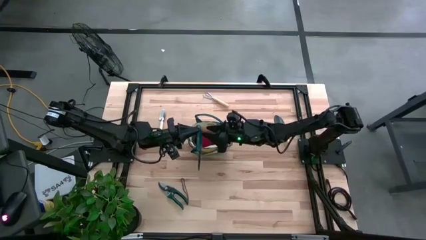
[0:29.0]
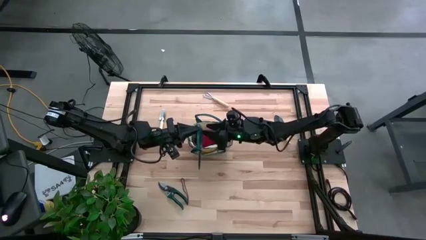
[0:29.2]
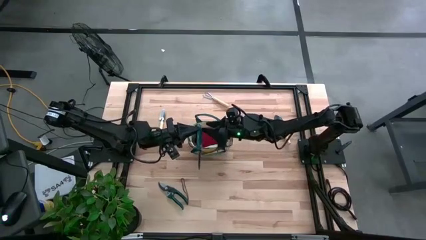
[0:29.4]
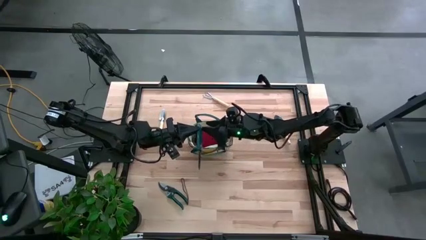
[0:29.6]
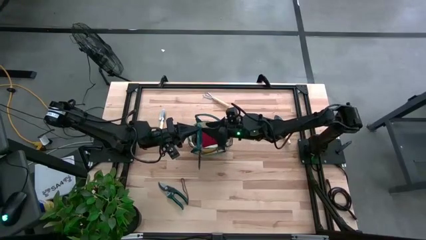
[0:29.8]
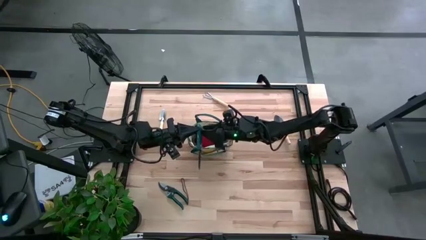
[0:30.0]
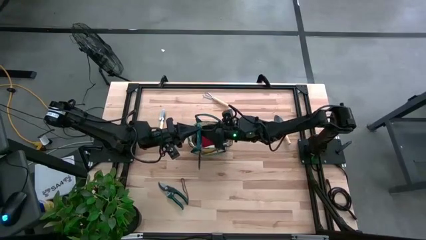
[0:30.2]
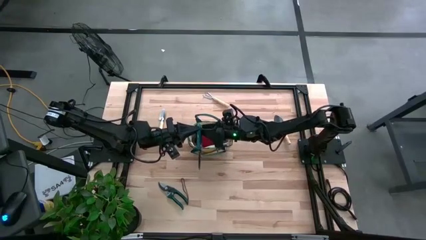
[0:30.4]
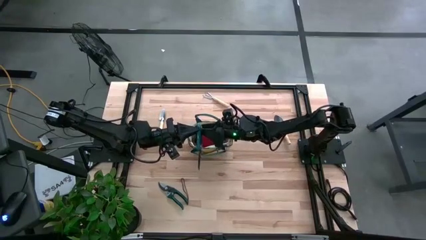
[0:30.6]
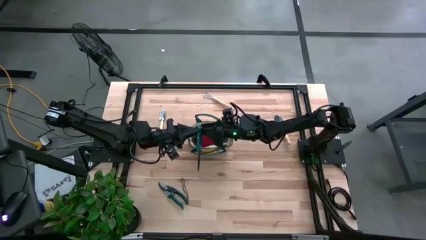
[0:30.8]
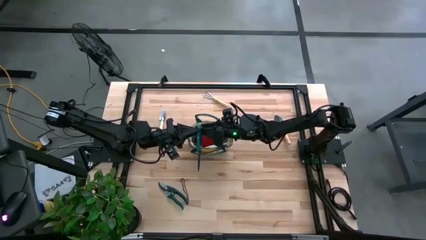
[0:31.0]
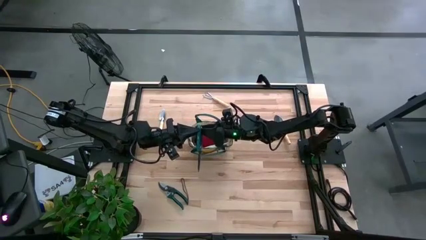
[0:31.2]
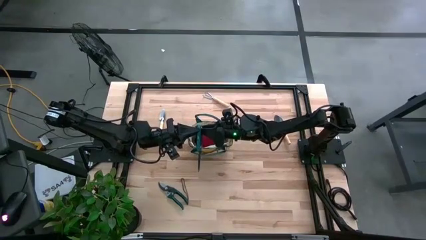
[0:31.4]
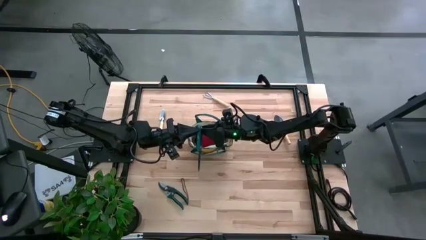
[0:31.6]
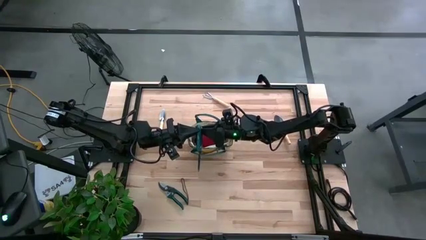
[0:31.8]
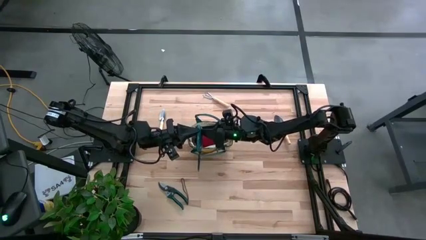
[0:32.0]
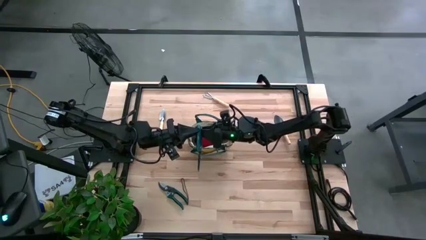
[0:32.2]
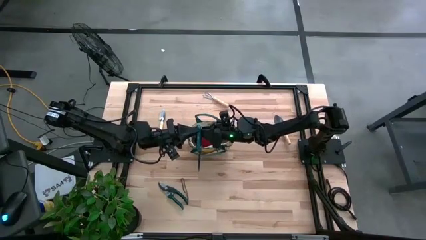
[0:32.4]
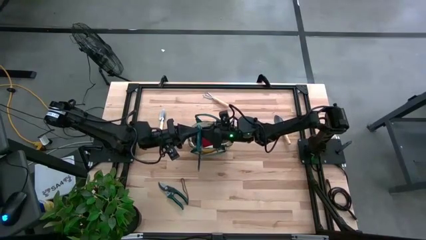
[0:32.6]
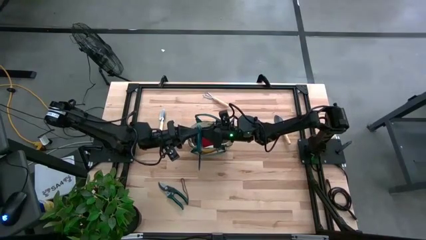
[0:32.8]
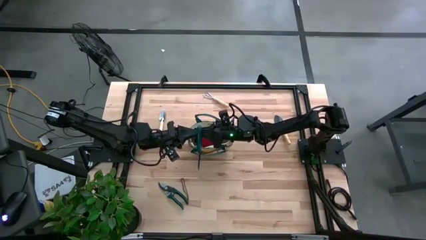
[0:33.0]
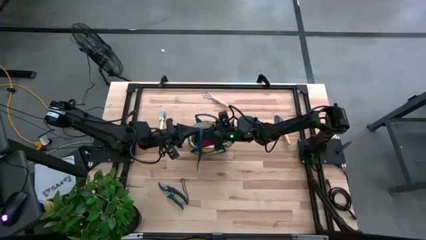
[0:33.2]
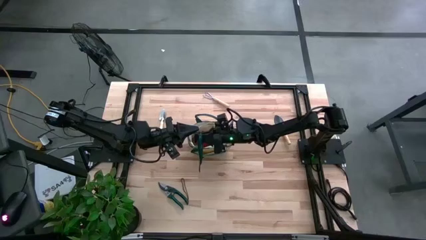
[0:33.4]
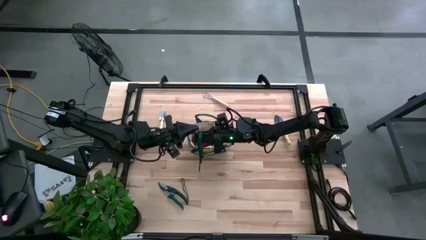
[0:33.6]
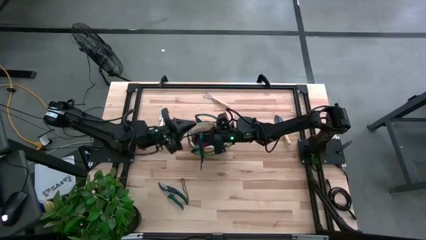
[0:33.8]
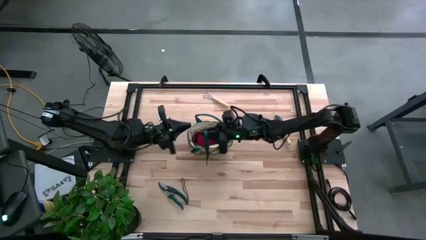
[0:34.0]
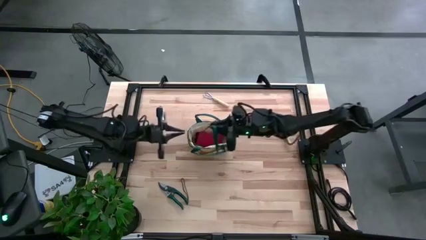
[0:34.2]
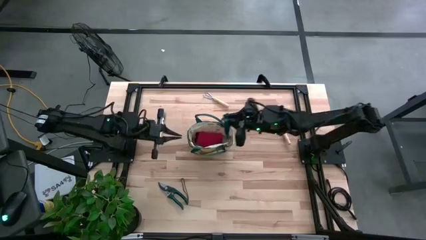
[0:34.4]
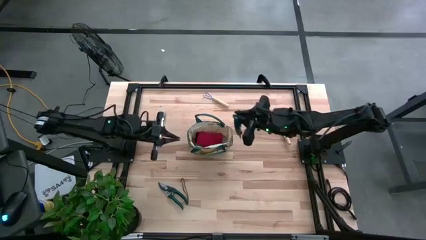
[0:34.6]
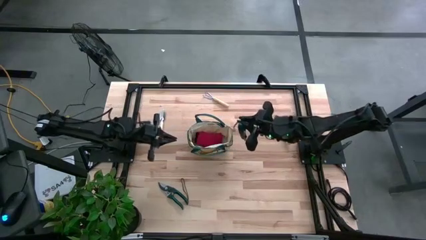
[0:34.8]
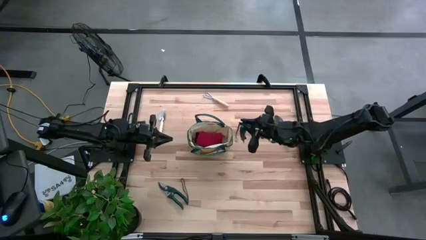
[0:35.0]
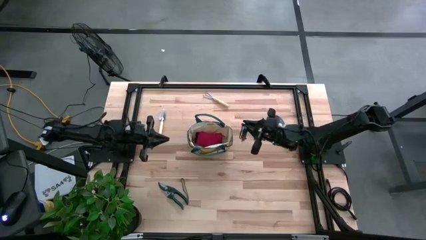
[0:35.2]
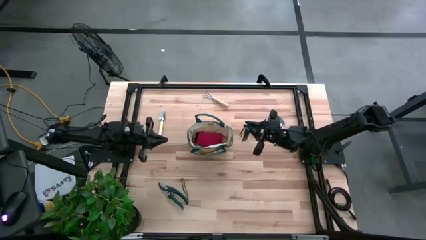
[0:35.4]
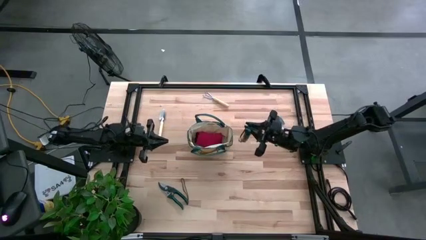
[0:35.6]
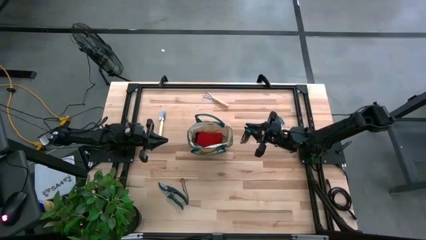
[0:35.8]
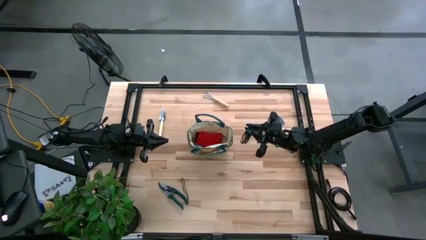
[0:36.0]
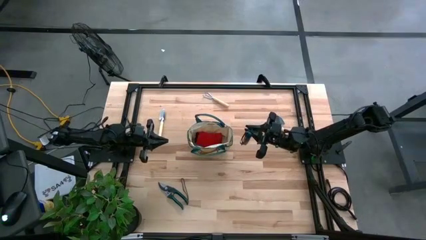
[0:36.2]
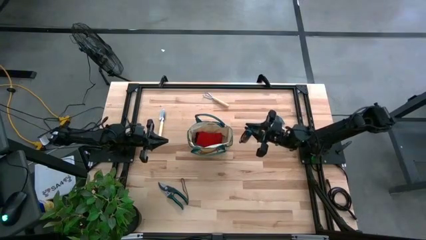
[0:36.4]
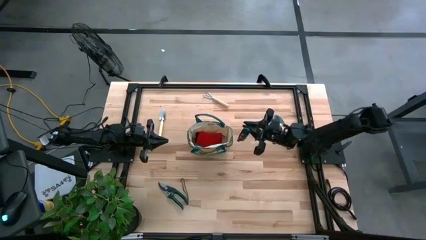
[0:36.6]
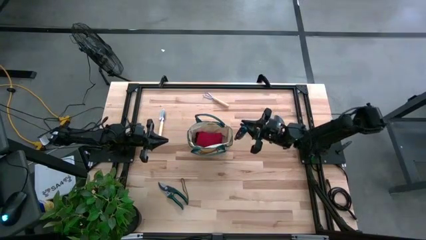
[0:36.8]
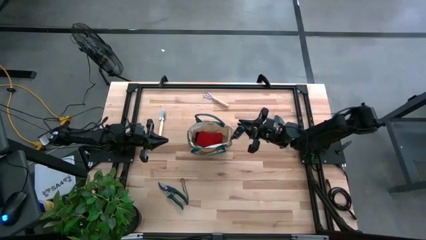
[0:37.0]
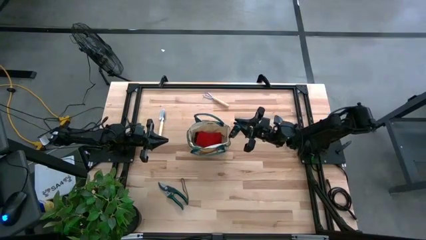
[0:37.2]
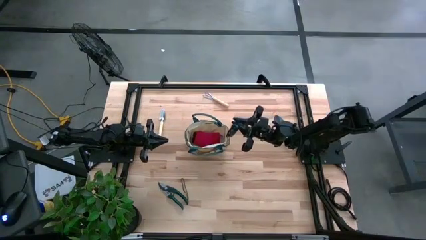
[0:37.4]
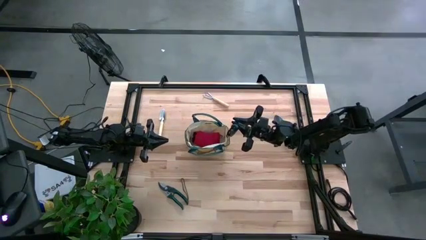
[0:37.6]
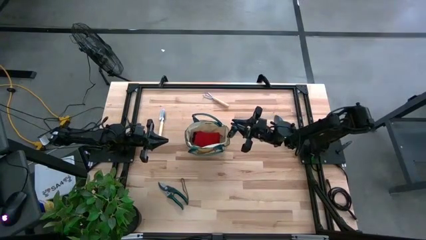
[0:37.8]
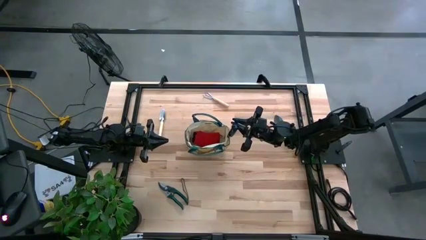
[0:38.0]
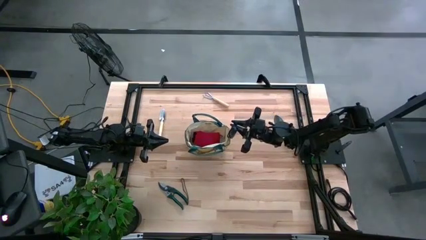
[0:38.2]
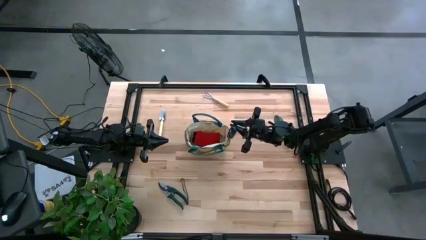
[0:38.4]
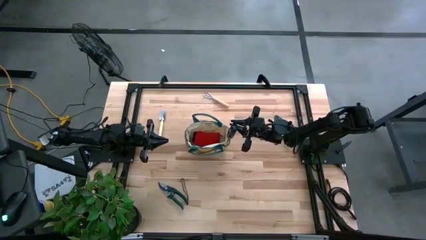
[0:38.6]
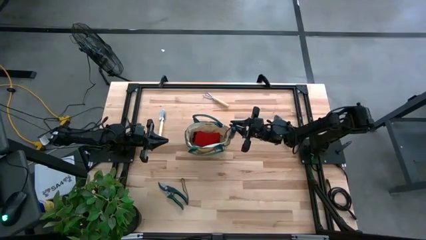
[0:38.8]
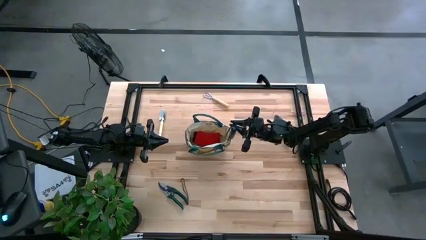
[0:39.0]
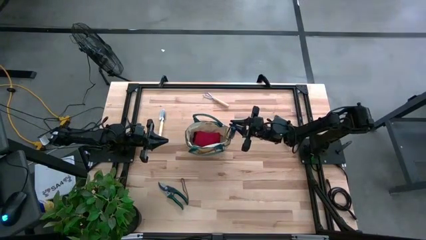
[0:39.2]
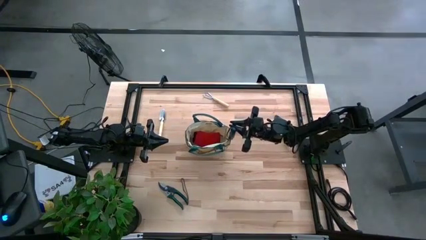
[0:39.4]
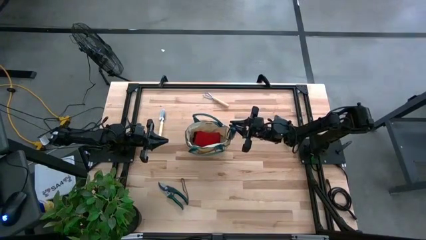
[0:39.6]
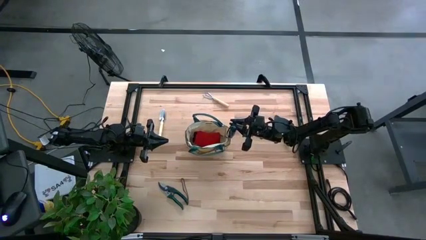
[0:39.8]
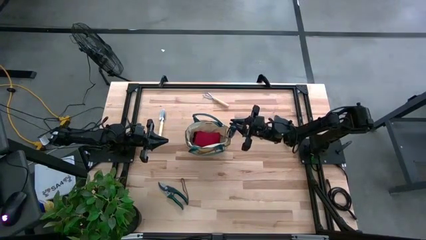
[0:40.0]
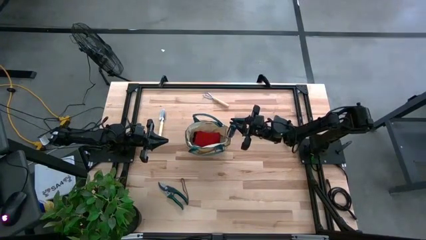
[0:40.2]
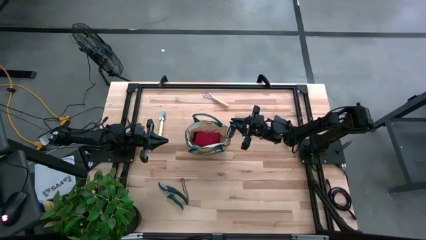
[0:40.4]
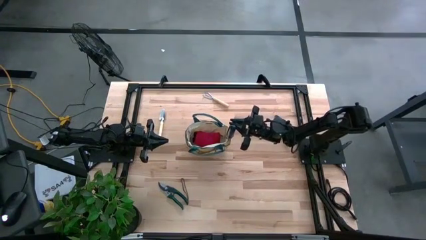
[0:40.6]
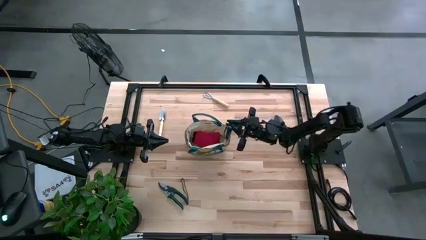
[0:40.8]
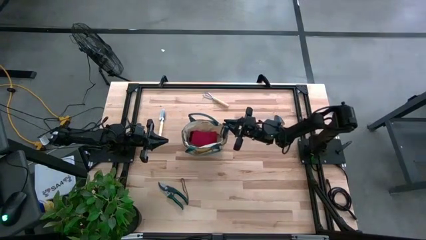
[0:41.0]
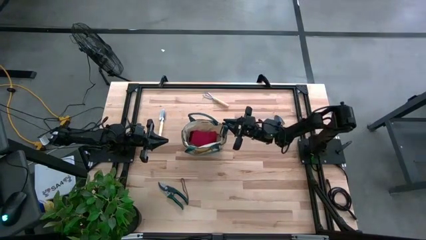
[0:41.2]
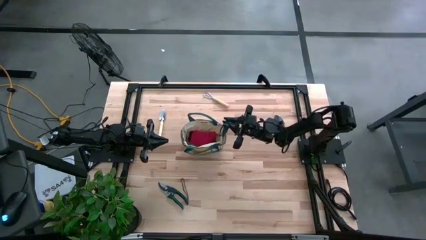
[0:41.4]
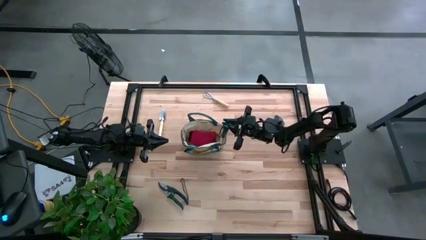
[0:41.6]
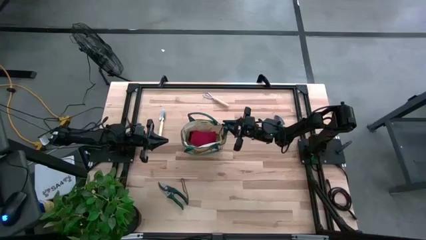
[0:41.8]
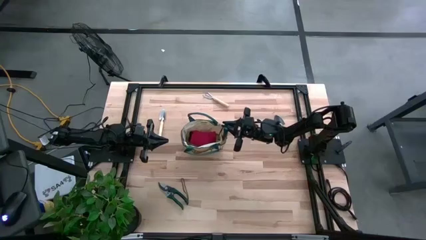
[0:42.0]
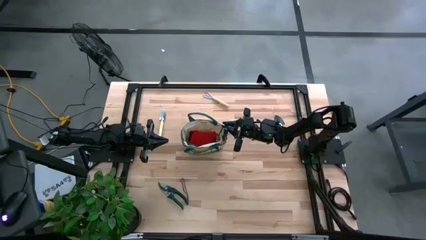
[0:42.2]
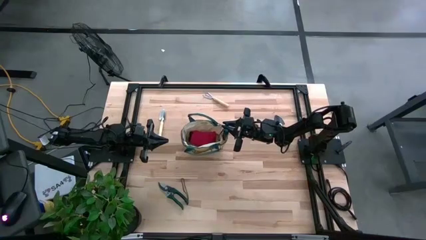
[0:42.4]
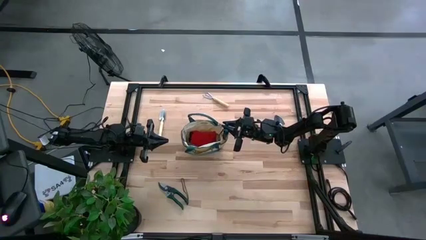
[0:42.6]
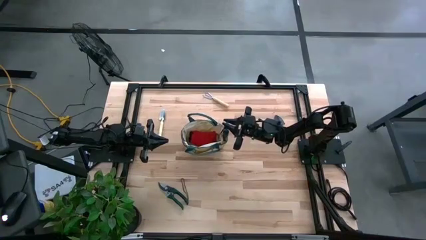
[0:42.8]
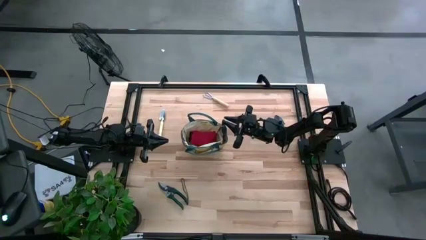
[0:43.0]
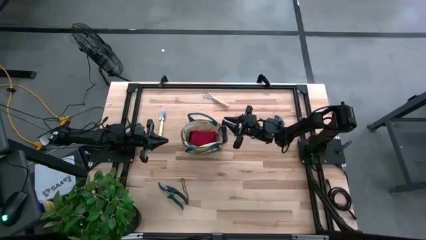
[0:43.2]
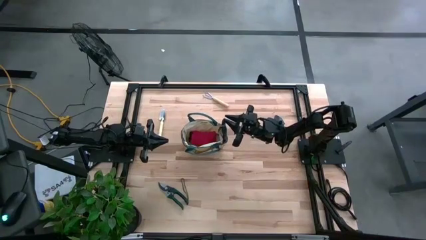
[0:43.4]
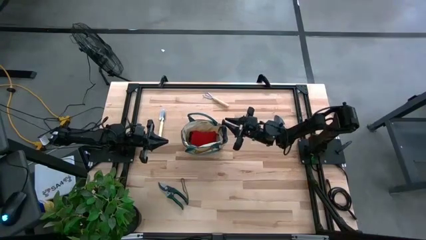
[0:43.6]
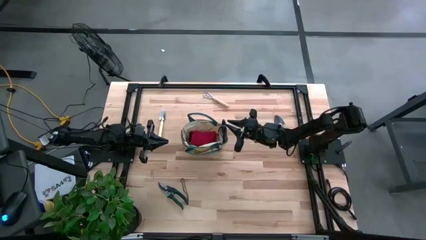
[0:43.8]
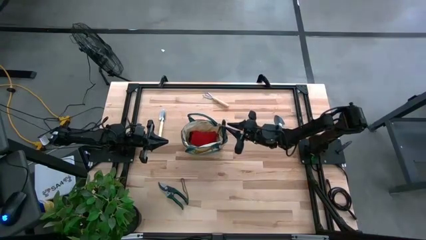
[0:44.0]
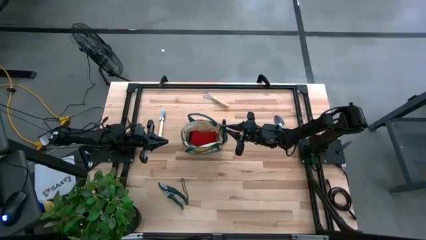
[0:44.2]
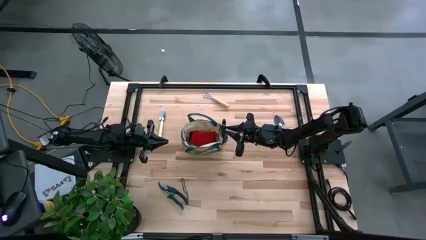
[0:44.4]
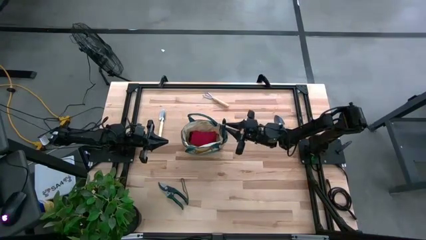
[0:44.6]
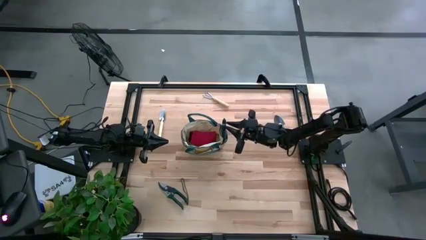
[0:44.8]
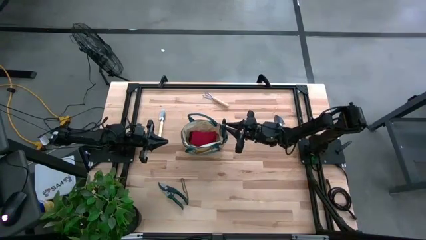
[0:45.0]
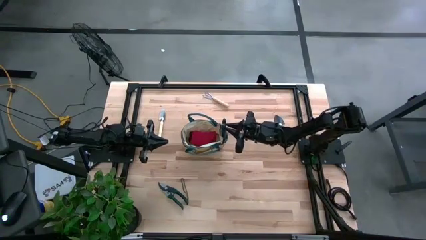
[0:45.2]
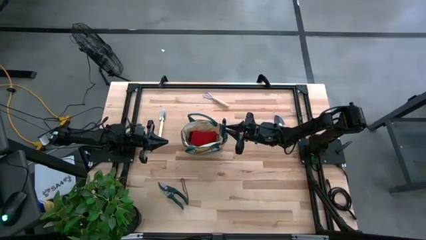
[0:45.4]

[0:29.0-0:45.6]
Task: Pick & Place Garden tools in Gardening bag
Put the right green shear scissors into the light brown gardening bag
